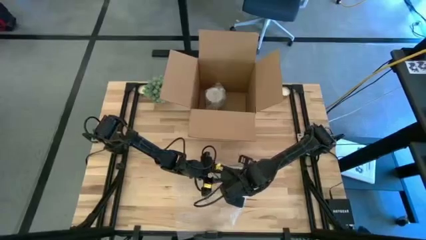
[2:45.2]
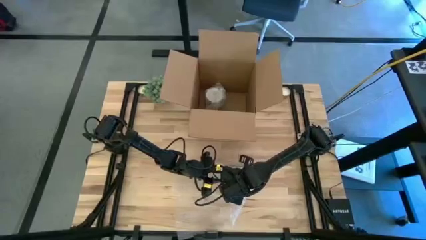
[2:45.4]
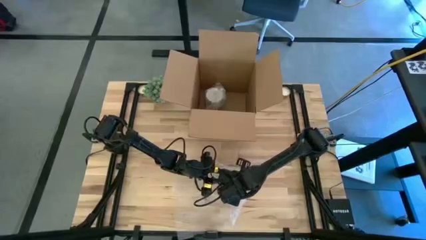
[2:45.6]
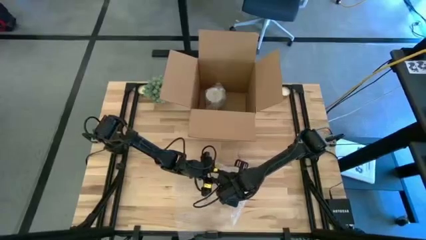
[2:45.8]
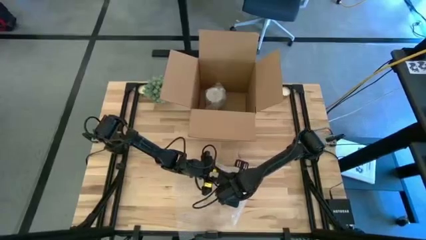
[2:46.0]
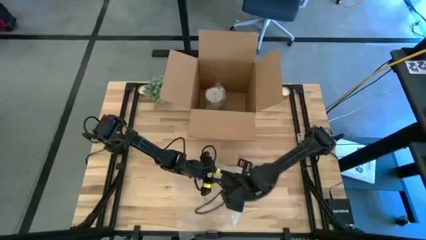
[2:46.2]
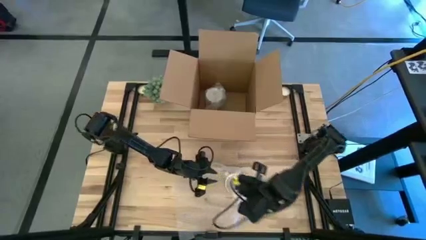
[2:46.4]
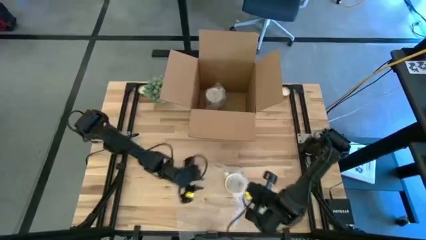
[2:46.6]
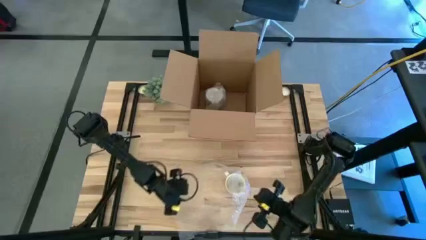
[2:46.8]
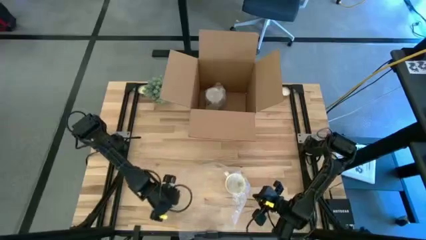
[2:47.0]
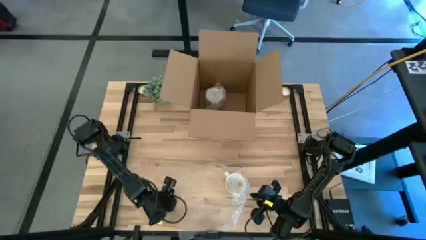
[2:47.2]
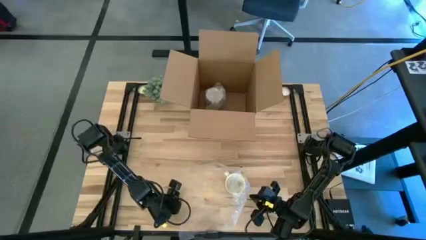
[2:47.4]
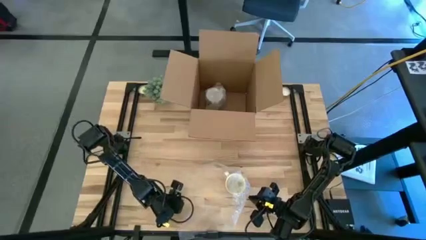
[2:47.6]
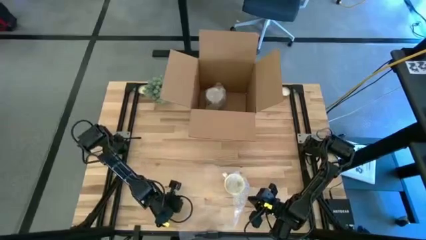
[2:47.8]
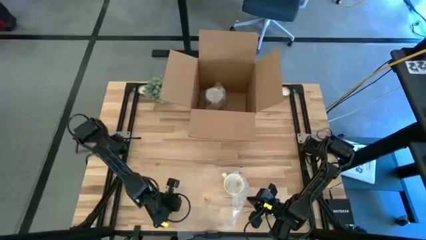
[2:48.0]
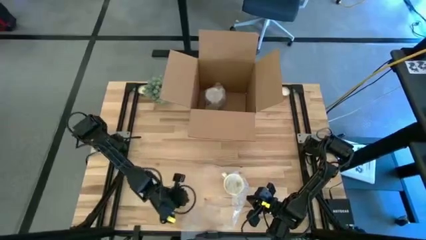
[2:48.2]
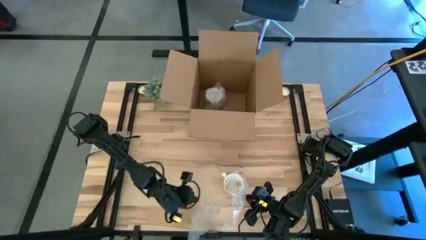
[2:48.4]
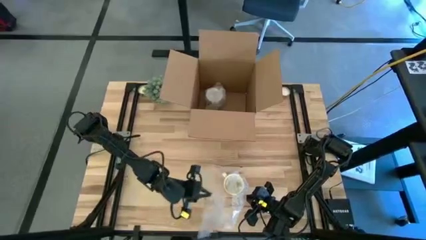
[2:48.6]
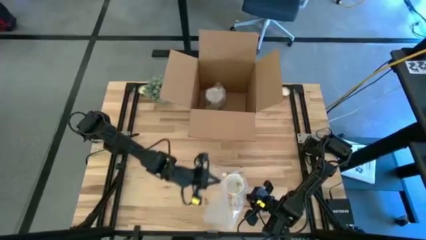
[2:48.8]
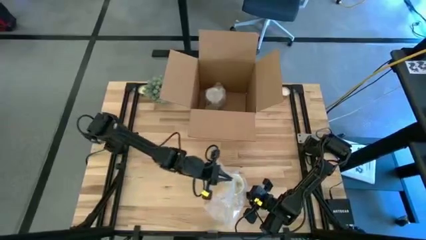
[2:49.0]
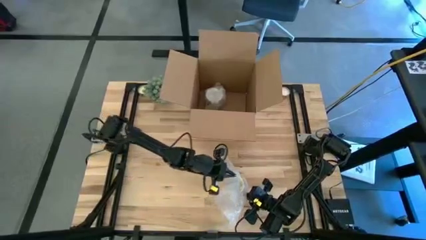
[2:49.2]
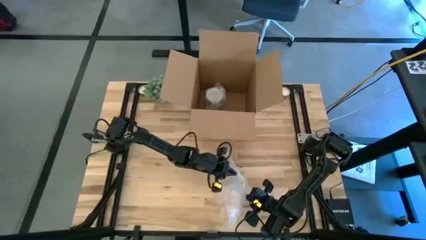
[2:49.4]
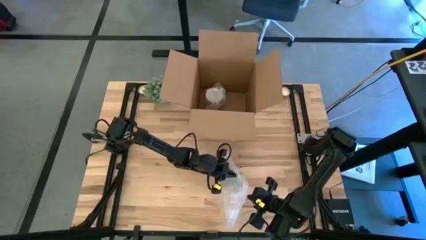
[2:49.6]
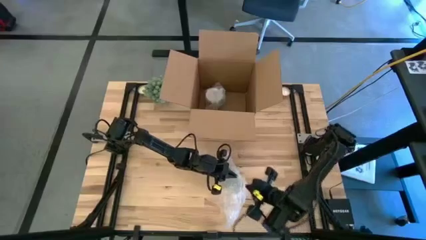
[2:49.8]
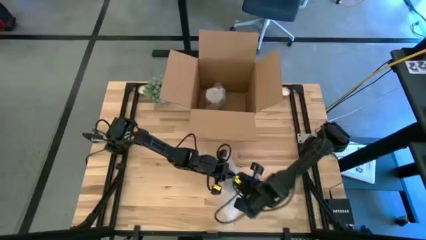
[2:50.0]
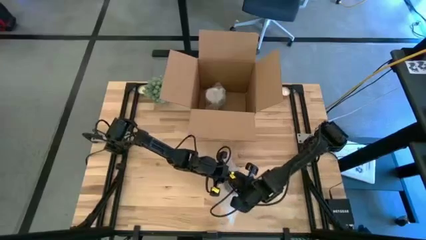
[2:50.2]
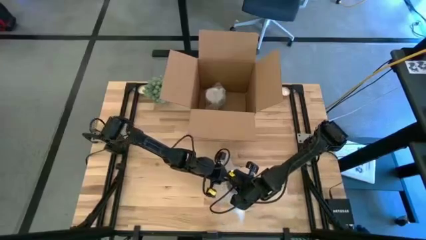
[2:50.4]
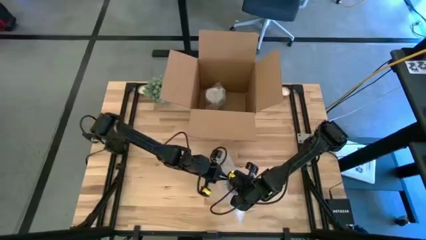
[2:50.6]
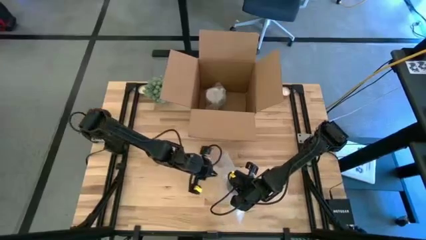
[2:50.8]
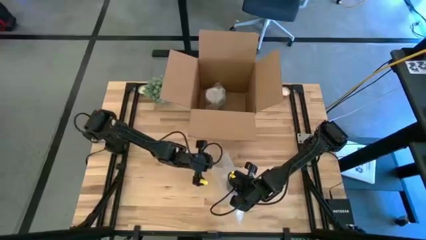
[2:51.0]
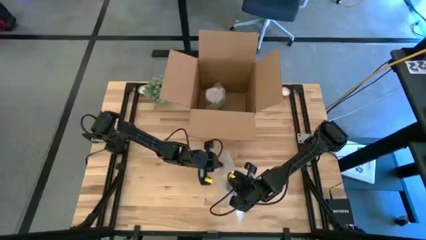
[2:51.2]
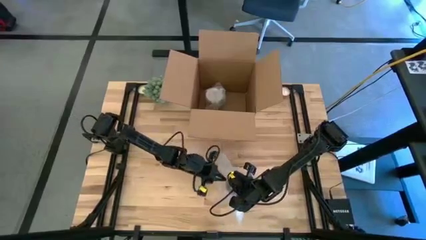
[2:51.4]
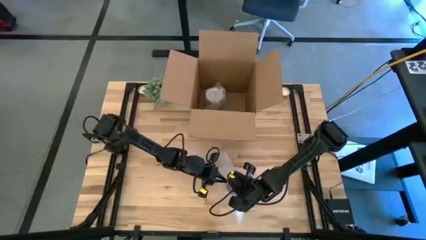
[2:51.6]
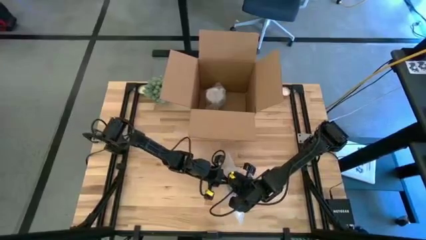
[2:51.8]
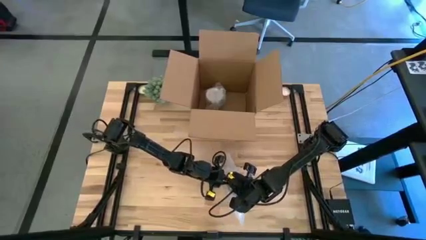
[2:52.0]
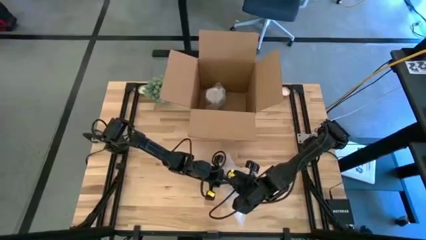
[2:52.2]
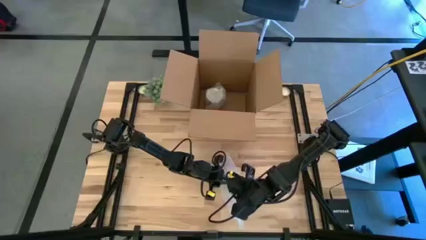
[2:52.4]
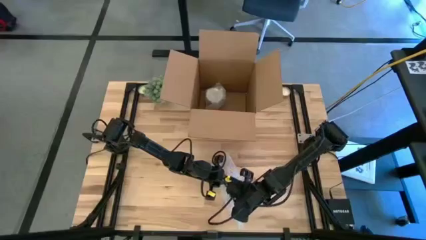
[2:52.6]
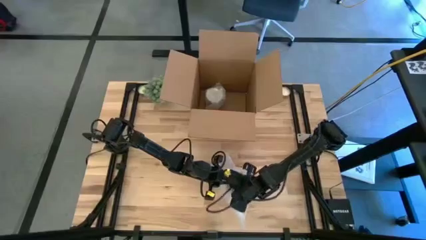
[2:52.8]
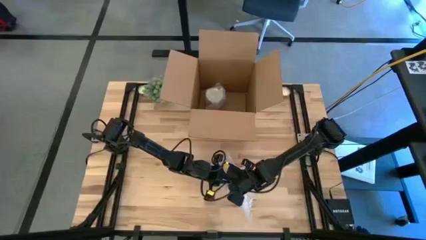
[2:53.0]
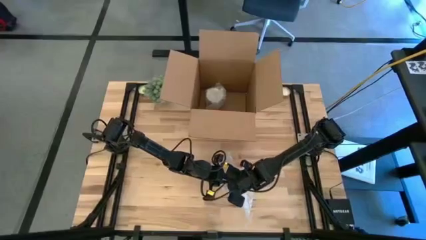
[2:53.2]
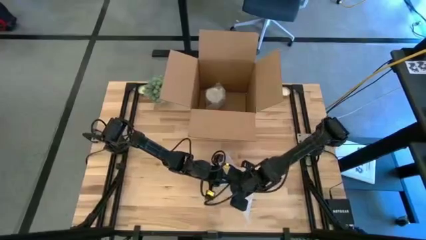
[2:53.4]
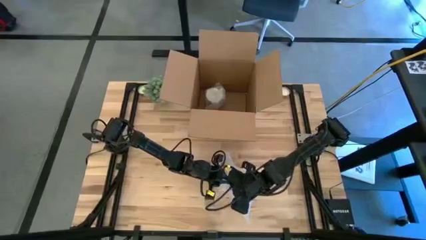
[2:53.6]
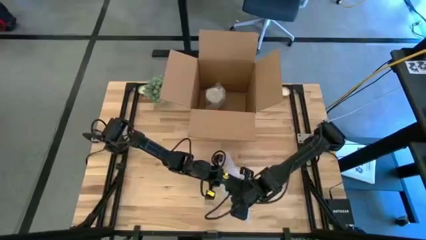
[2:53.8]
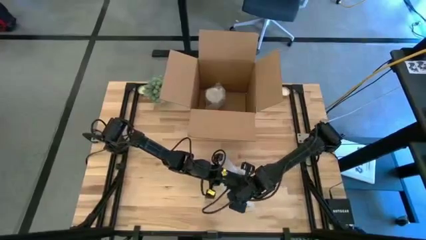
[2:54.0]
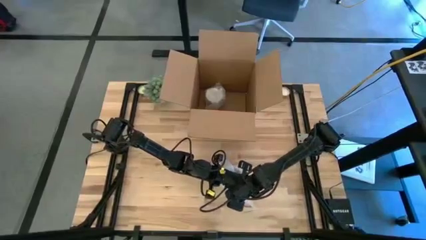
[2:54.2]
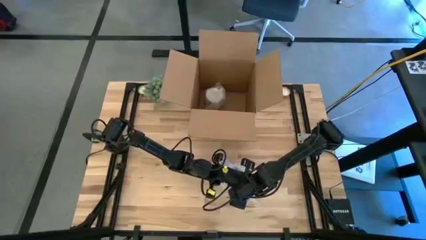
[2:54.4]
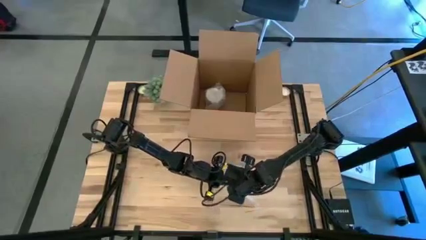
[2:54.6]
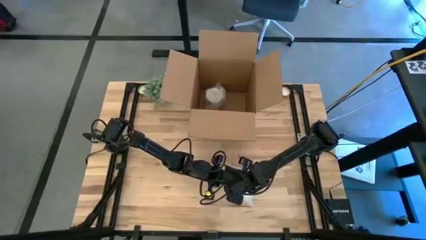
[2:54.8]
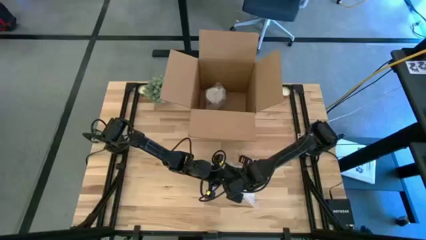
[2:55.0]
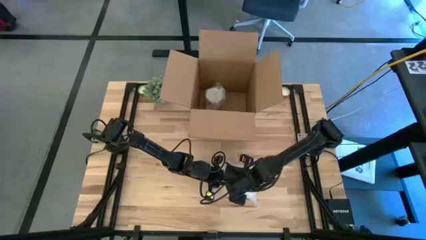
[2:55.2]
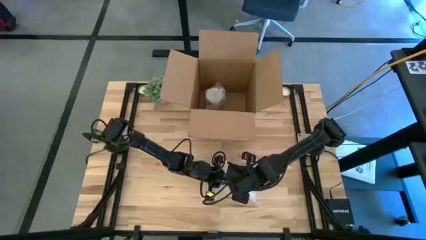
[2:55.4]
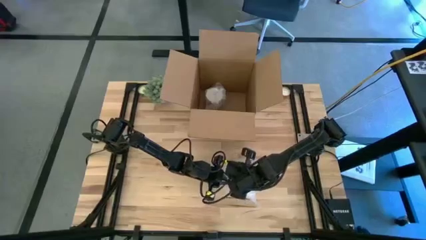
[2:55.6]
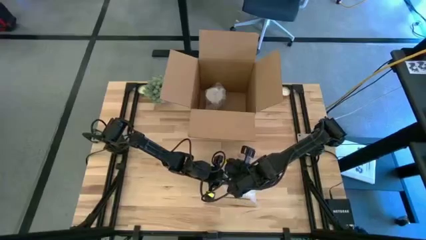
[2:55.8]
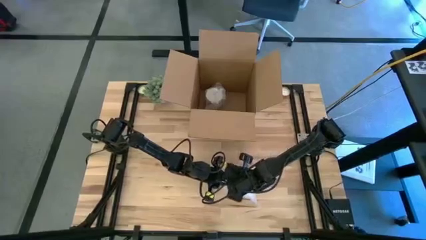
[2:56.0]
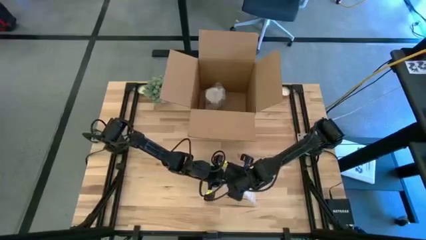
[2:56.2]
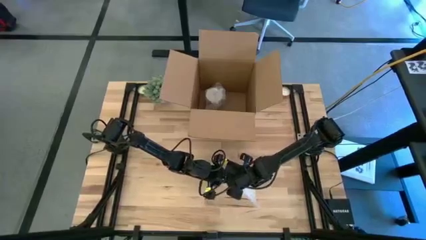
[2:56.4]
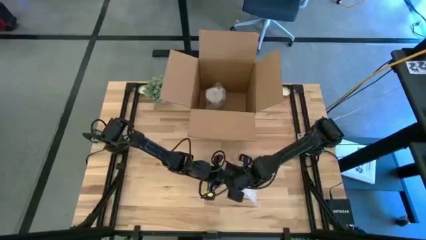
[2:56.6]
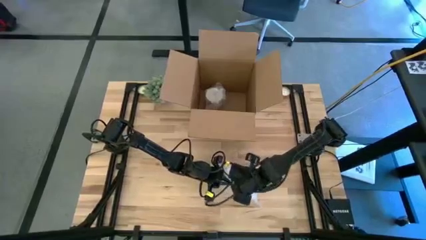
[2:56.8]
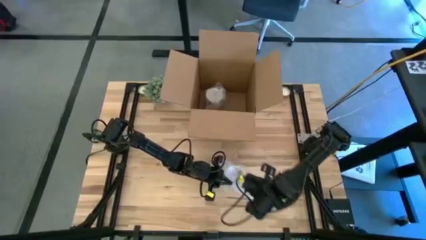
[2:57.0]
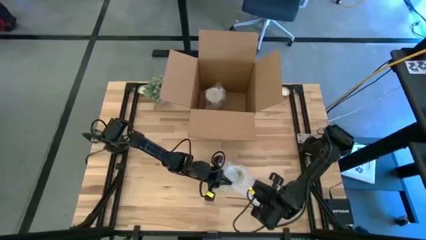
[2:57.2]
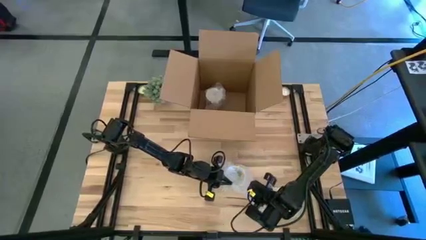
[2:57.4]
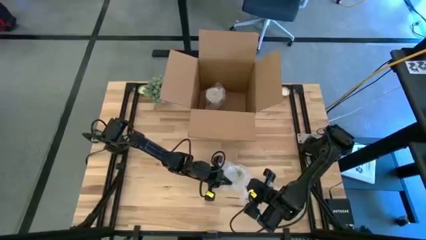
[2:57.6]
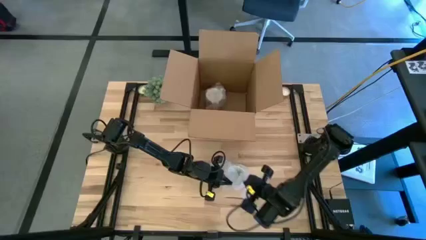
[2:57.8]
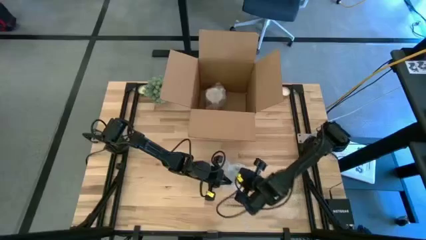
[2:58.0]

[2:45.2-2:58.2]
Task: wrap mug
Wrap the orange mug with bubble wrap

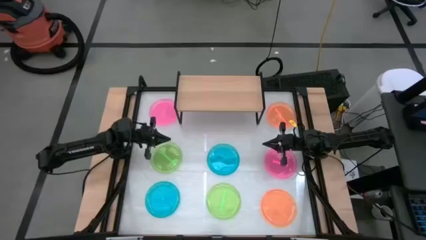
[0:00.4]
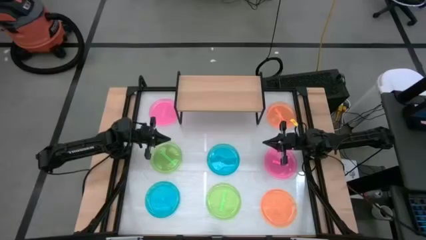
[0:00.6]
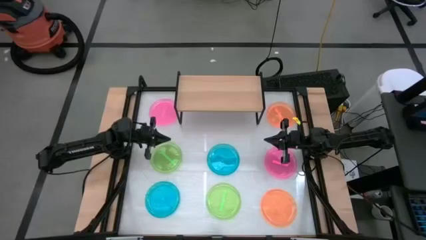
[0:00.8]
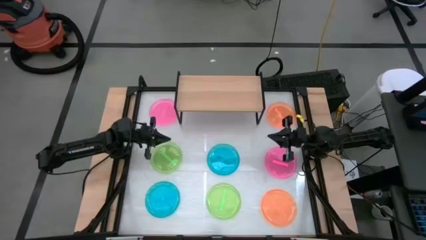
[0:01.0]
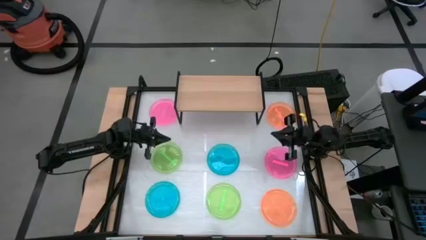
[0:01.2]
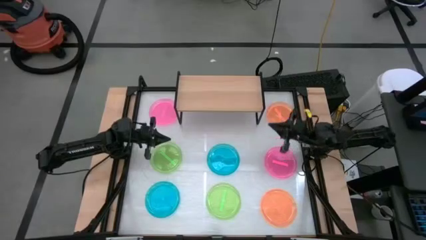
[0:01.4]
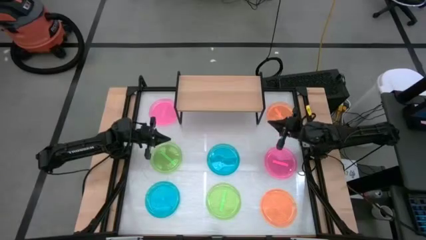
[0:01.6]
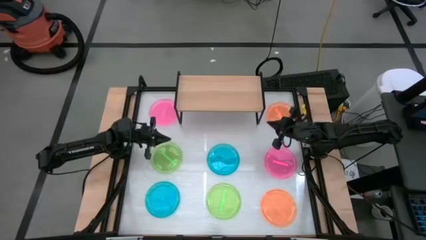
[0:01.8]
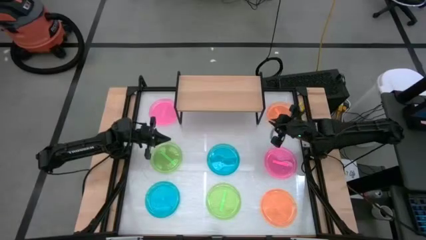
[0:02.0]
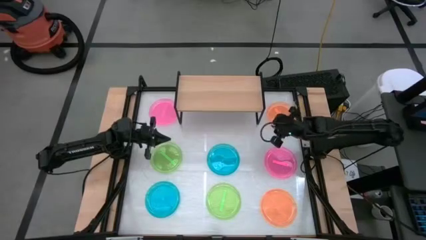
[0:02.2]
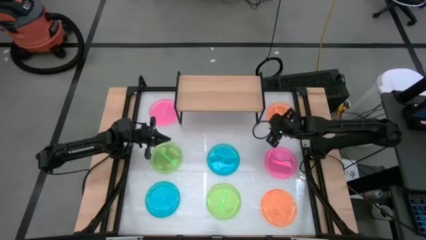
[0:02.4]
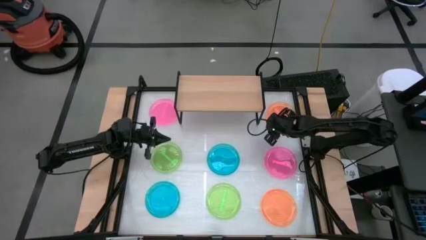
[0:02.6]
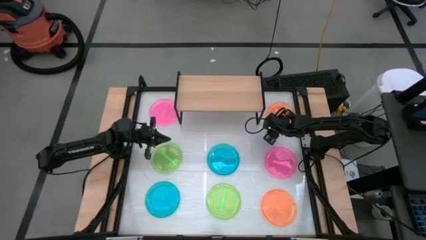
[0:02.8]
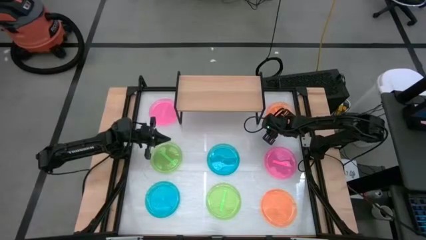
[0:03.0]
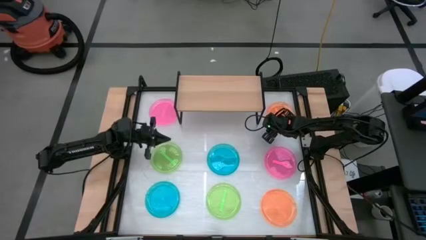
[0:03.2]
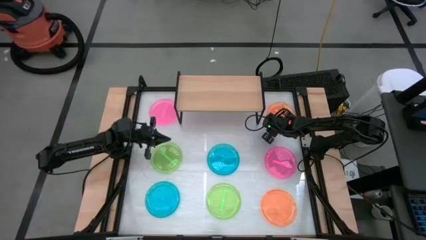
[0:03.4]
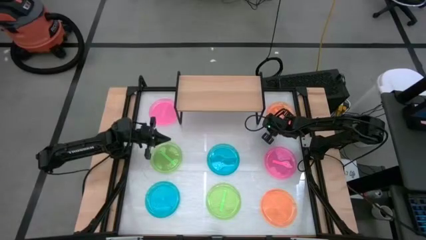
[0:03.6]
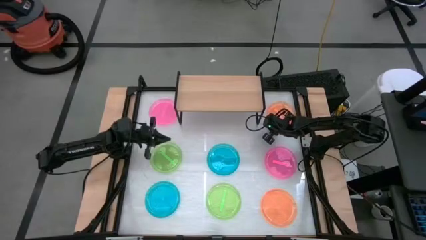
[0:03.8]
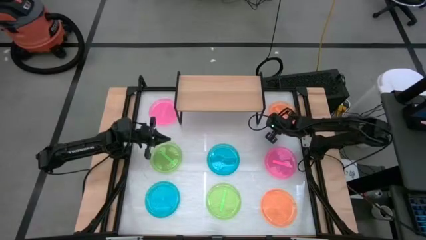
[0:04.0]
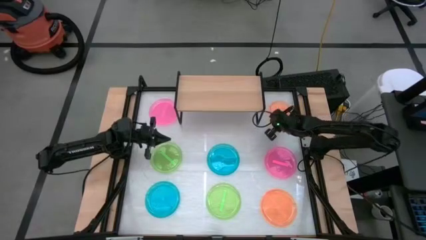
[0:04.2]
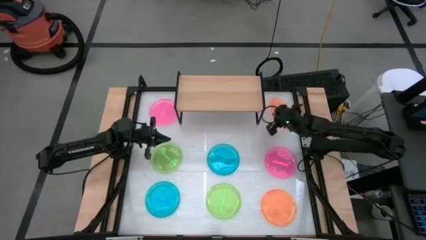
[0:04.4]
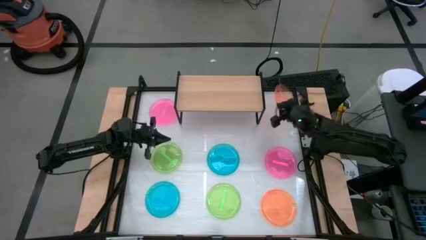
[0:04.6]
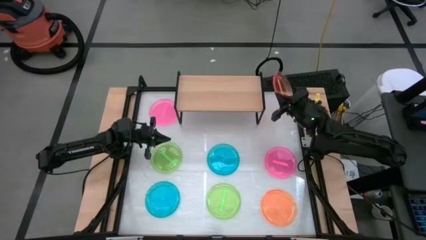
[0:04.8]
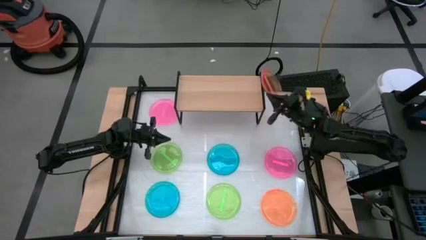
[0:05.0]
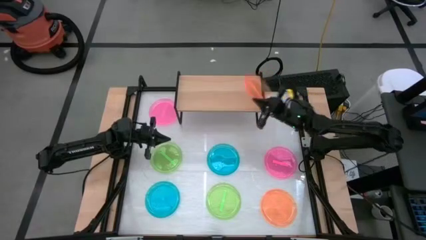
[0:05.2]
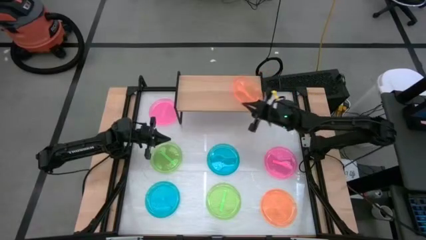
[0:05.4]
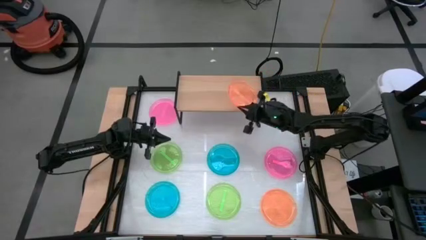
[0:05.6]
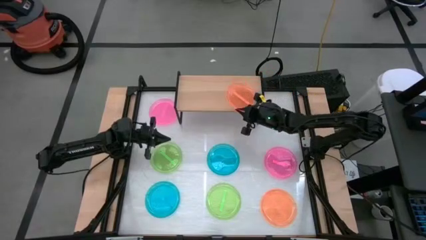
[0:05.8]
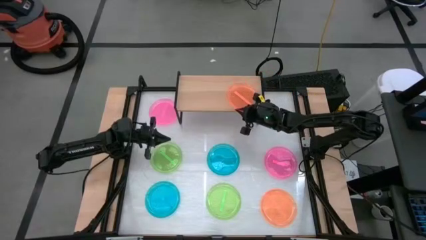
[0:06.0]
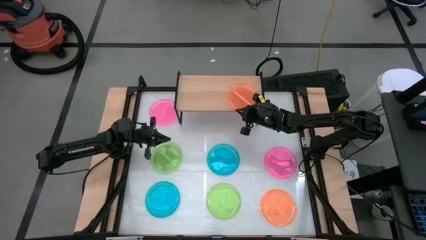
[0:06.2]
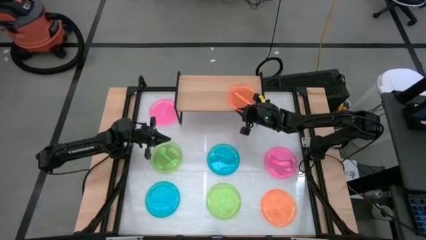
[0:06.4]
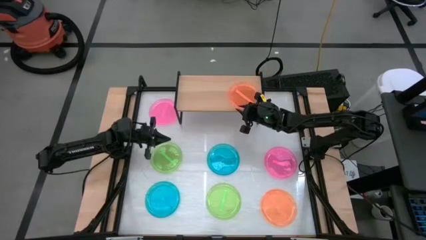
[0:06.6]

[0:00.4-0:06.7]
Task: Place and stack plates onto a shelf
Put the top orange plate on the shelf
